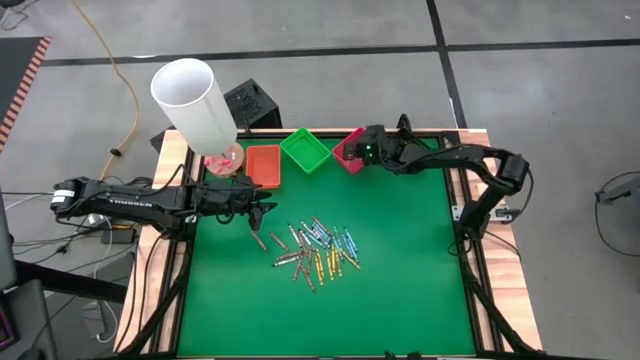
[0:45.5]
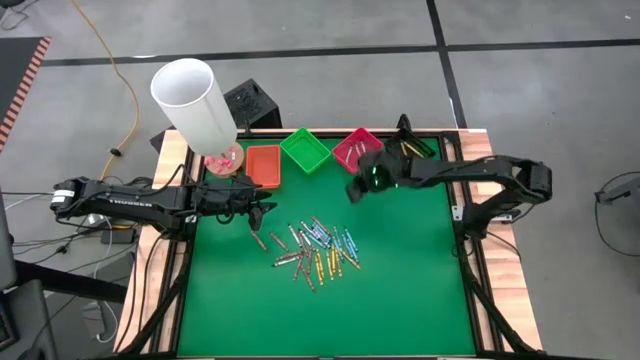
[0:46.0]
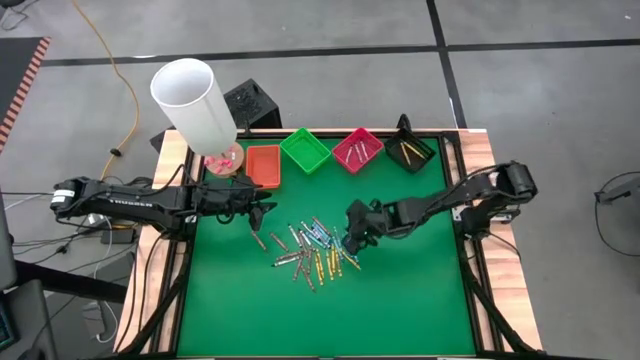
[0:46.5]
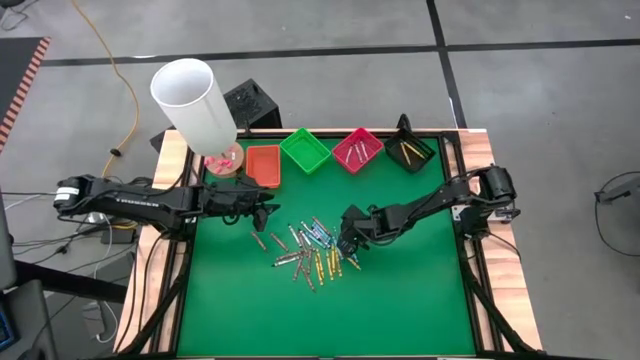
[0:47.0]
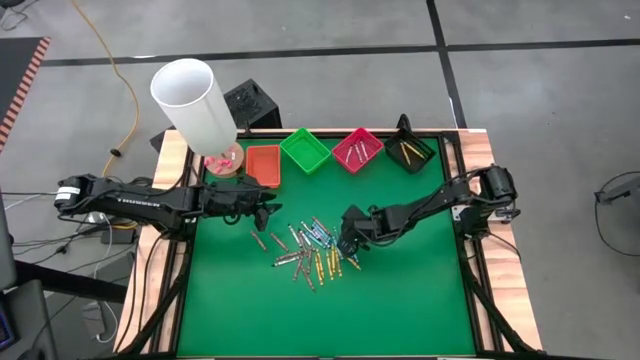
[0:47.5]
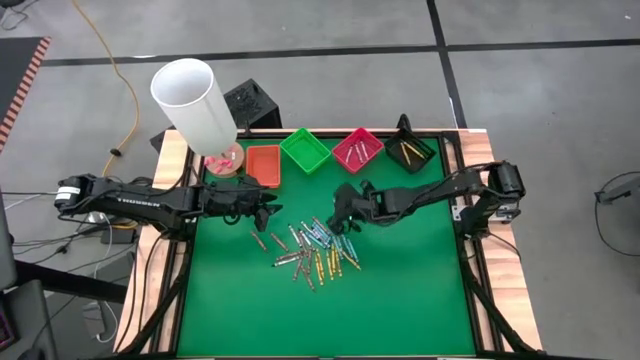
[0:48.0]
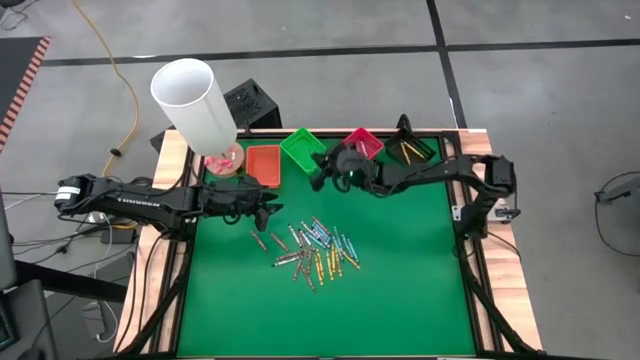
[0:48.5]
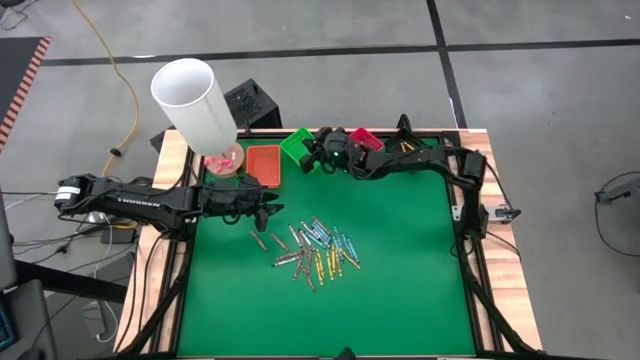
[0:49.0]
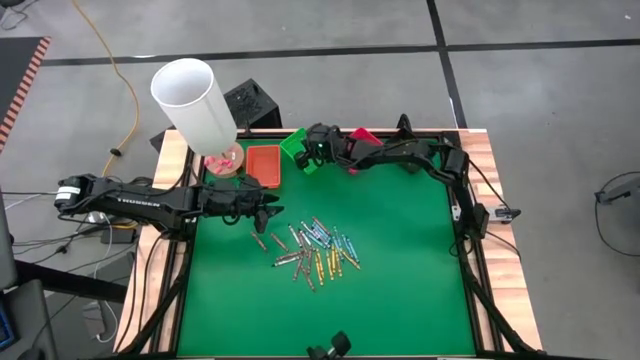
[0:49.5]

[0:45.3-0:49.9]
Task: Sort crayons
Put the blue/green crayon into the green bin

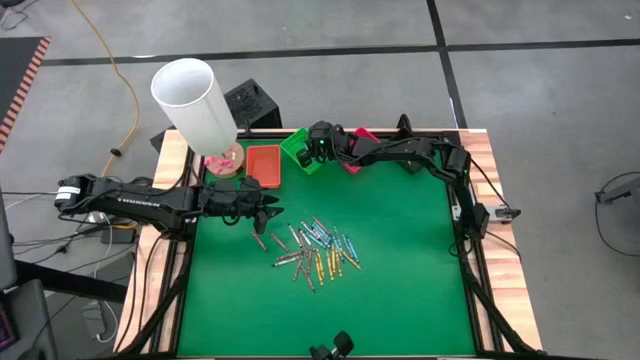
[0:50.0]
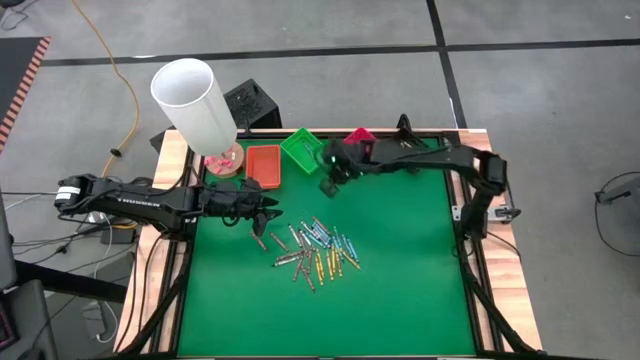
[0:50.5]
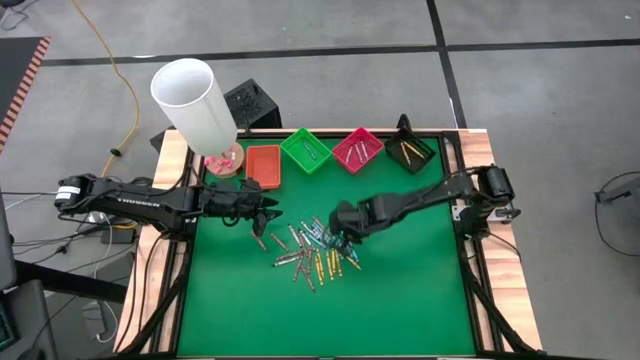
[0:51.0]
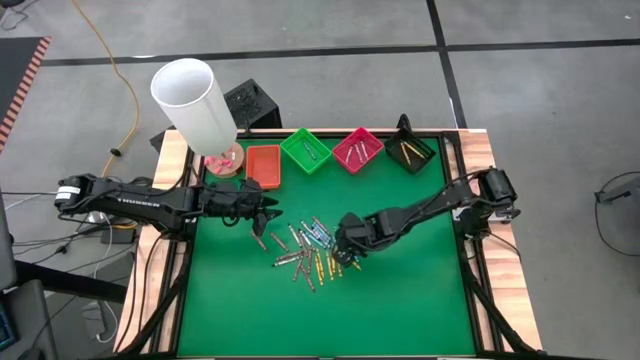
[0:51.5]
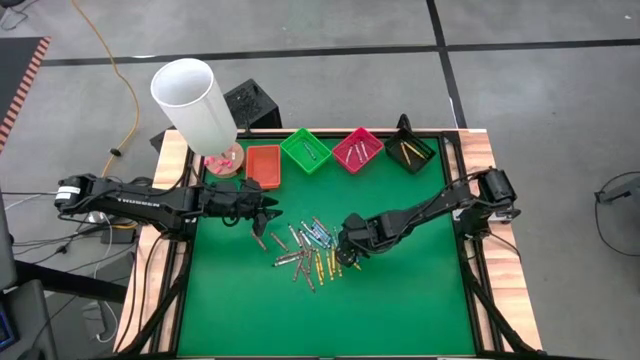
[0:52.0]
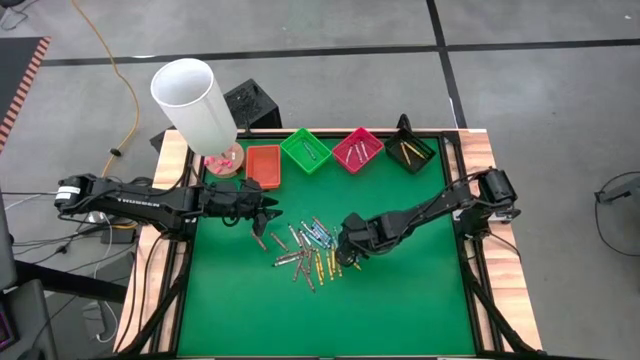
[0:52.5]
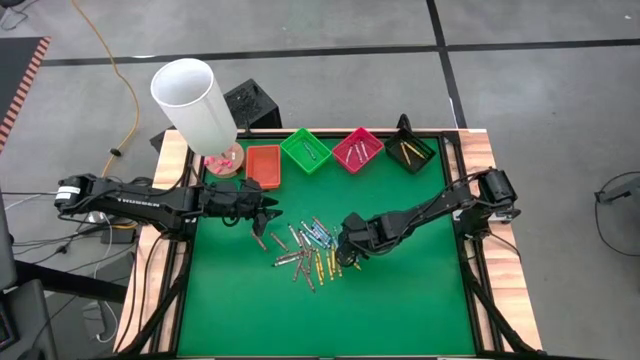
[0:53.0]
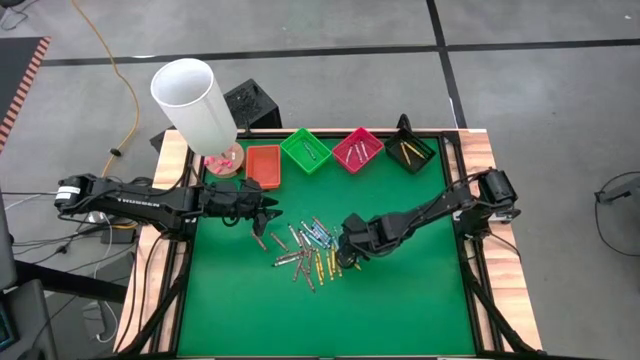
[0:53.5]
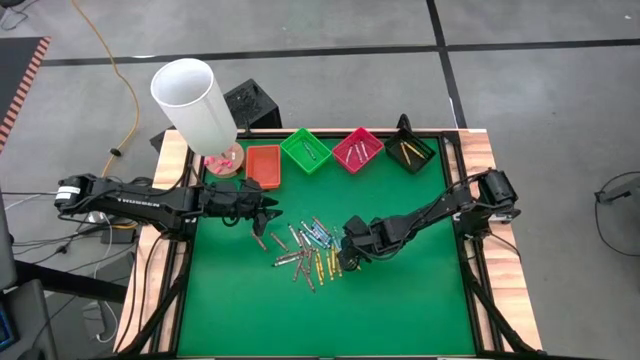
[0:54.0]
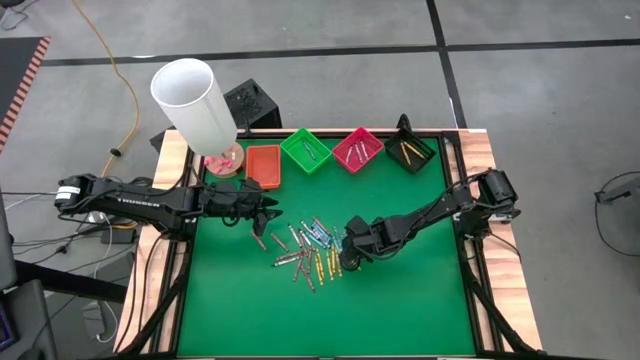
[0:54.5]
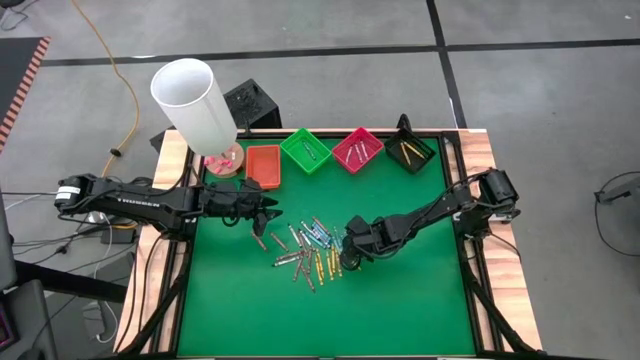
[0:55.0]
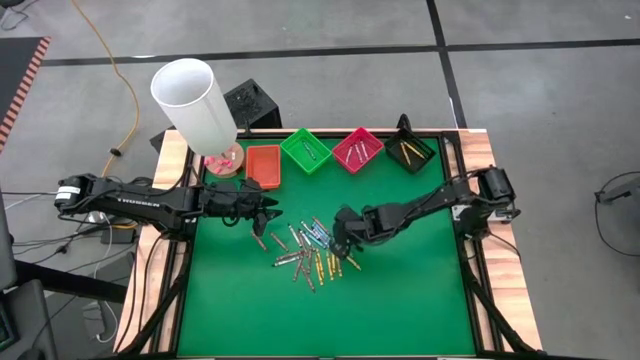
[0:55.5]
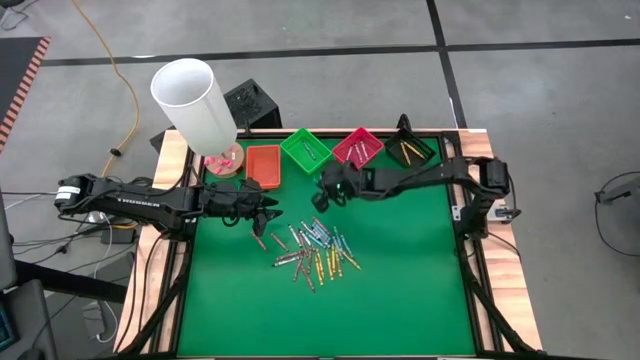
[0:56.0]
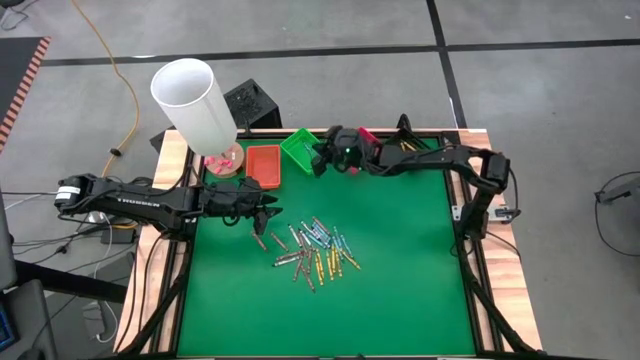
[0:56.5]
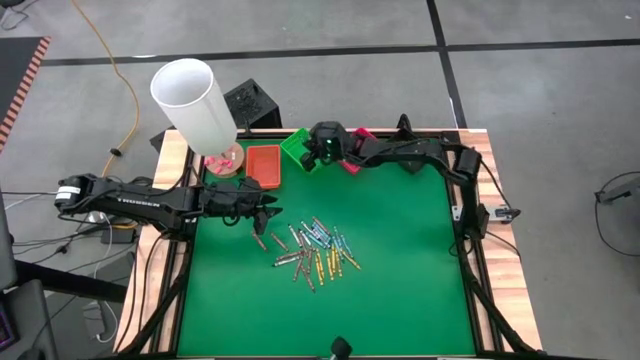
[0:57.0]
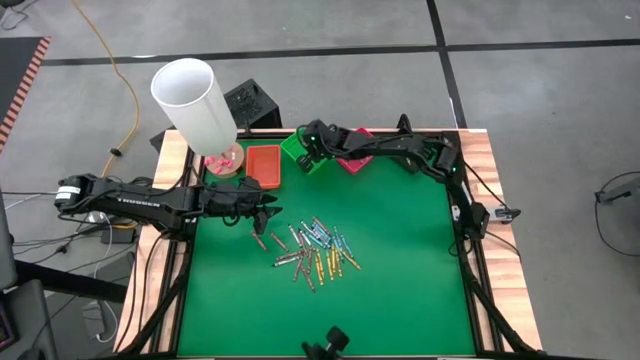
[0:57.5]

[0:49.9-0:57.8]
Put the blue/green crayon into the green bin

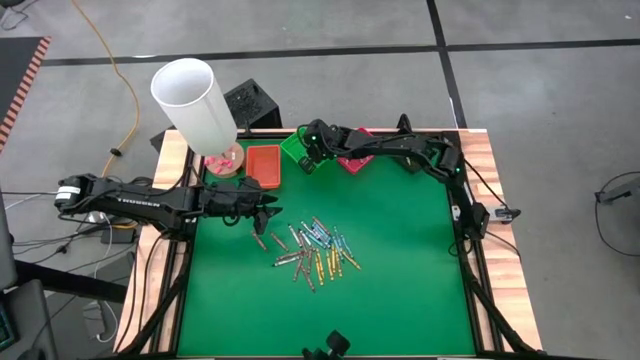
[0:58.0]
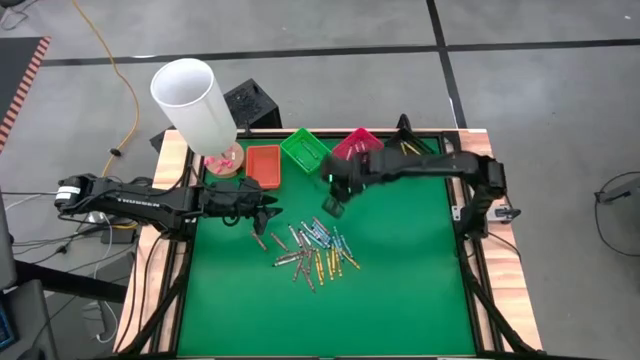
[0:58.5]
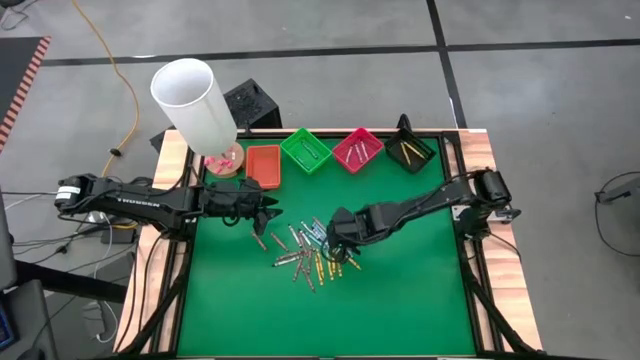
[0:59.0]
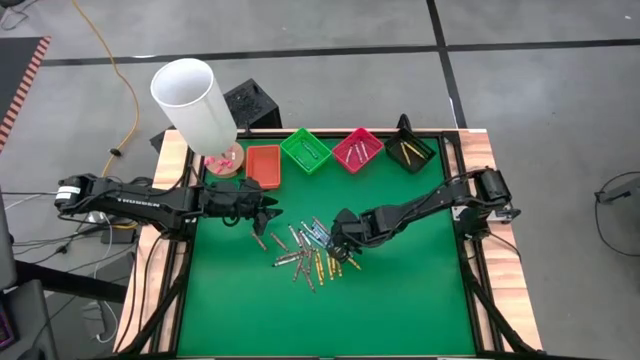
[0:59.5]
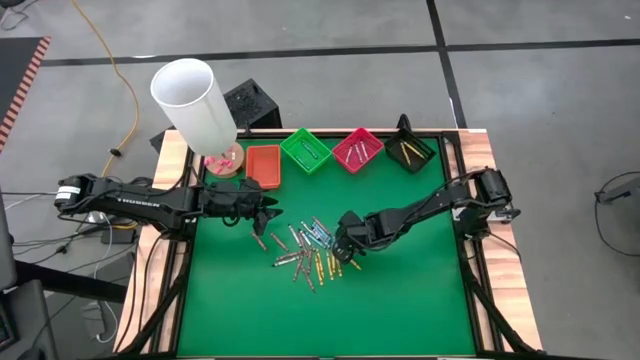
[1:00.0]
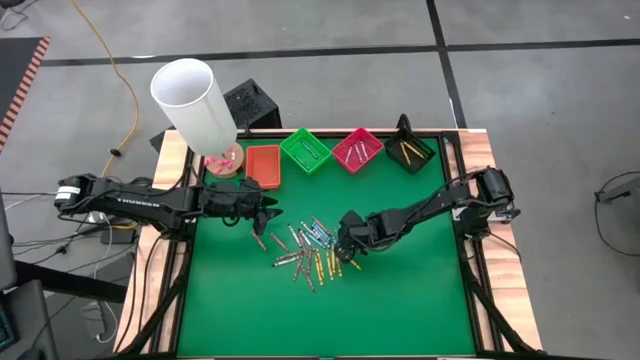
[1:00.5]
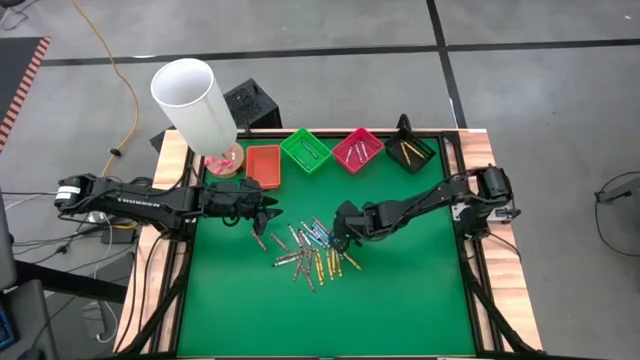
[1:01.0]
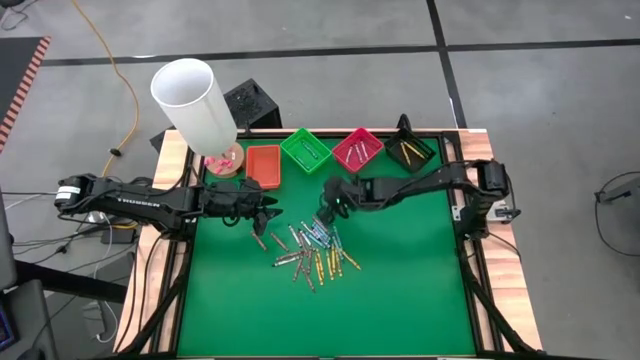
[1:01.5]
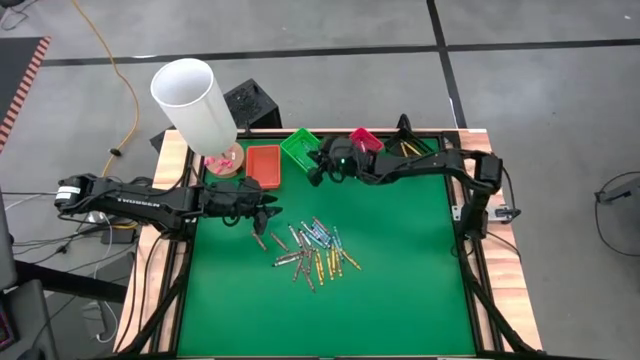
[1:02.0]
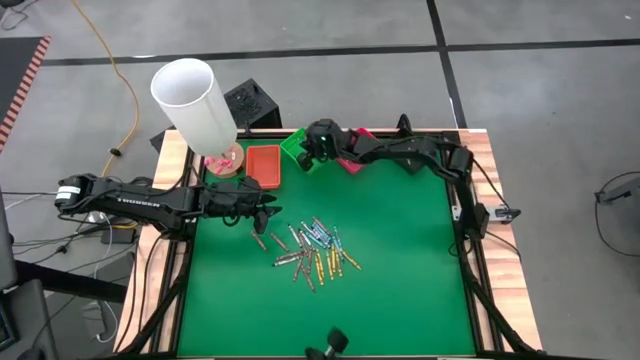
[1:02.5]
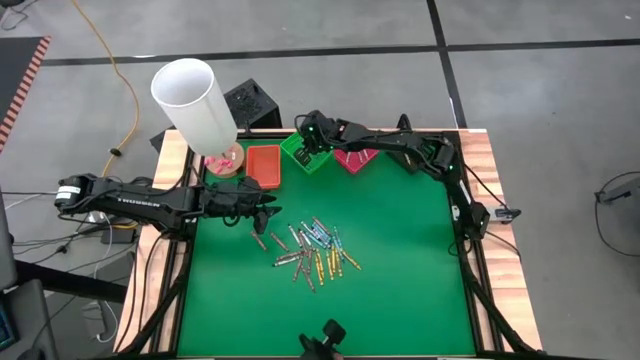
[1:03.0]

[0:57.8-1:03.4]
Put the blue/green crayon into the green bin

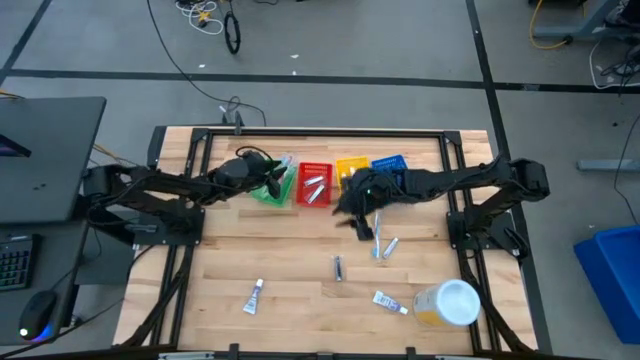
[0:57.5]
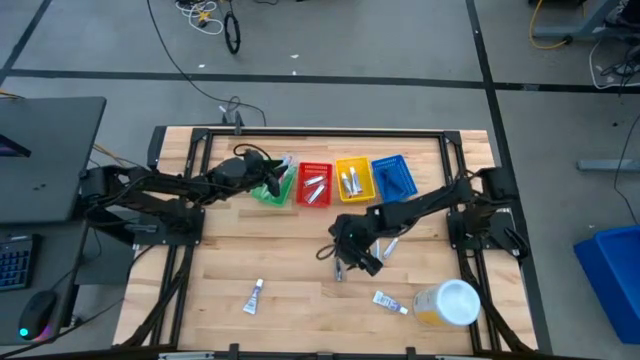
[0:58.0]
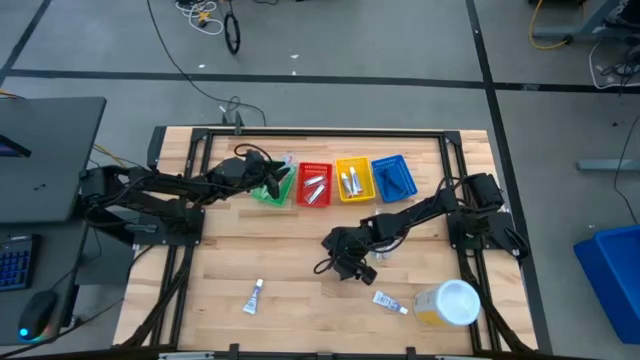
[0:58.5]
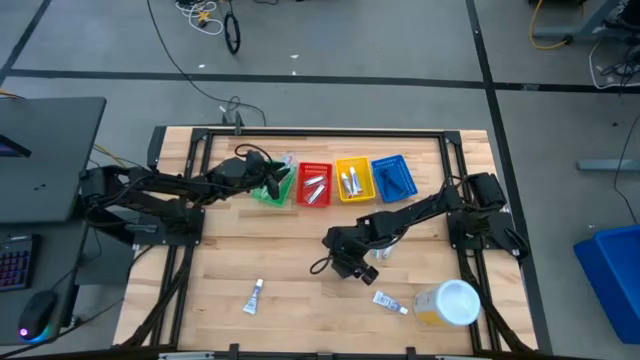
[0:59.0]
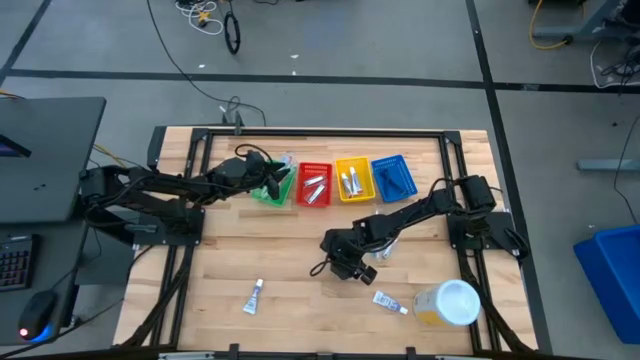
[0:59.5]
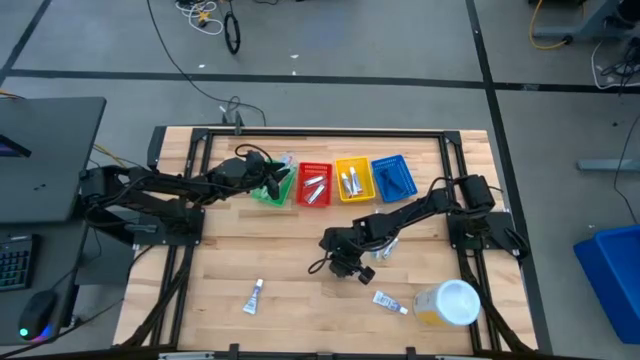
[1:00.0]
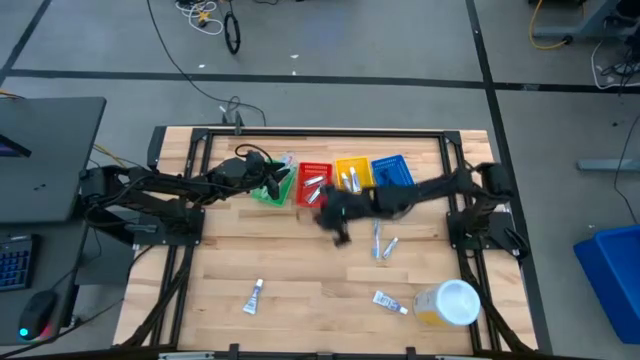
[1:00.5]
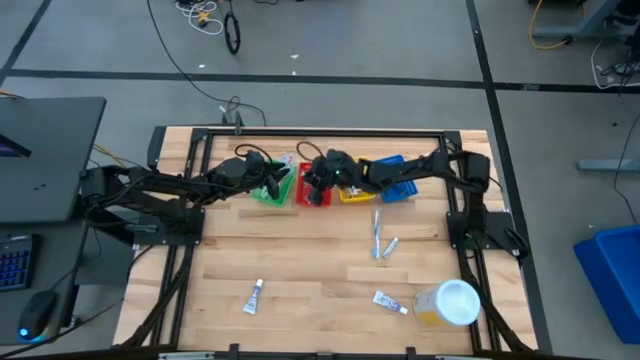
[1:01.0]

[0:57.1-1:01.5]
Task: Pick & Place Travel size toiletries
Put the silver nail cutter into the red bin
